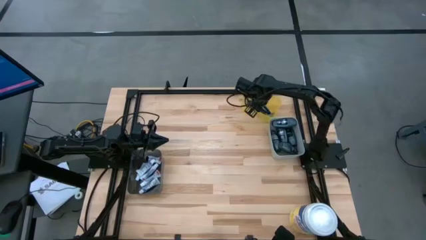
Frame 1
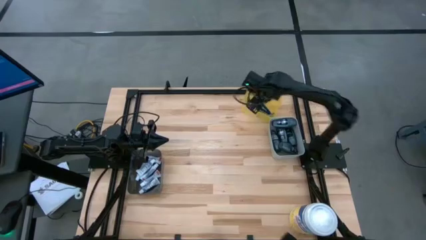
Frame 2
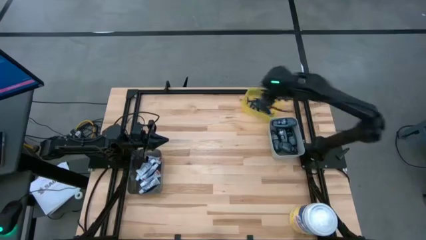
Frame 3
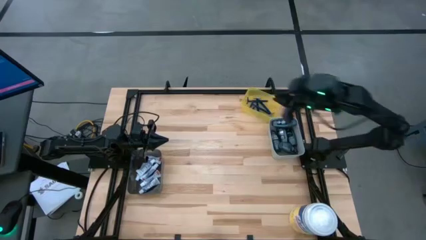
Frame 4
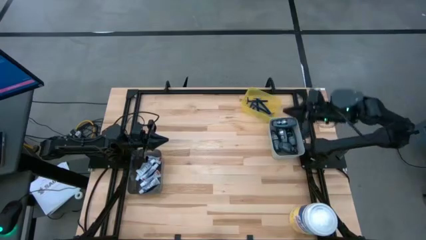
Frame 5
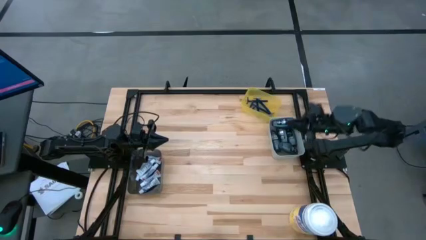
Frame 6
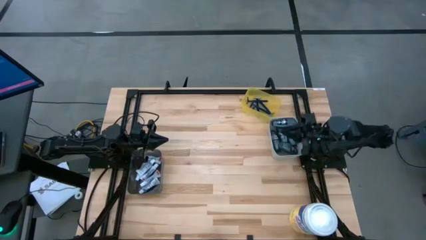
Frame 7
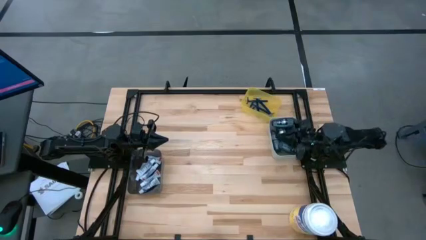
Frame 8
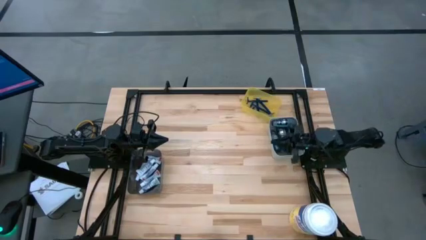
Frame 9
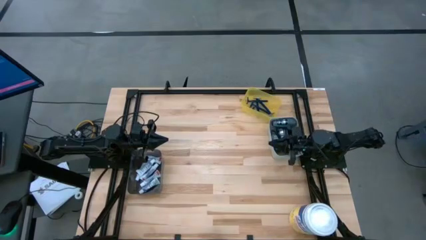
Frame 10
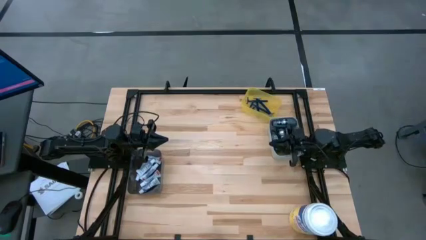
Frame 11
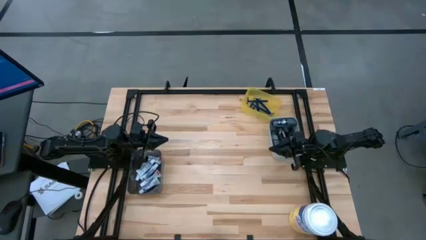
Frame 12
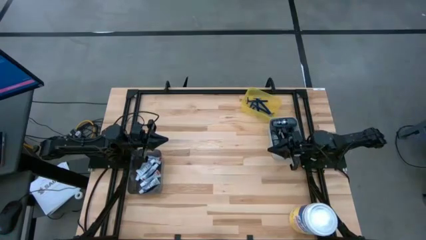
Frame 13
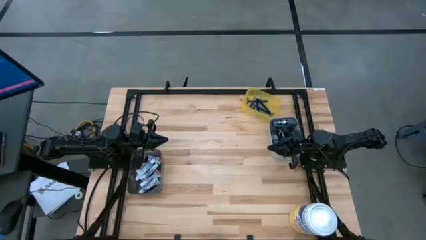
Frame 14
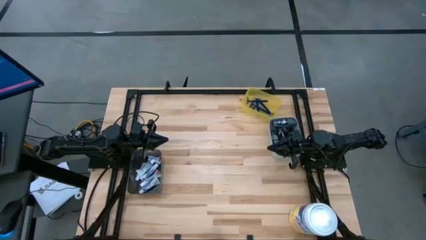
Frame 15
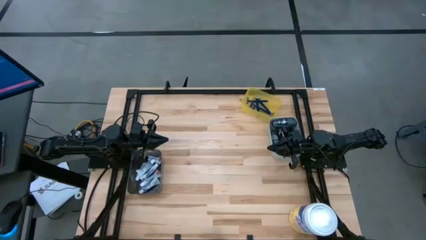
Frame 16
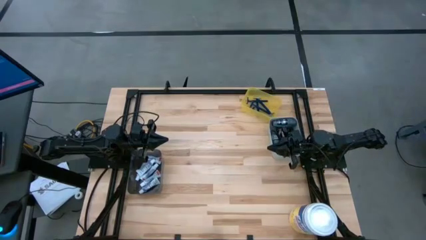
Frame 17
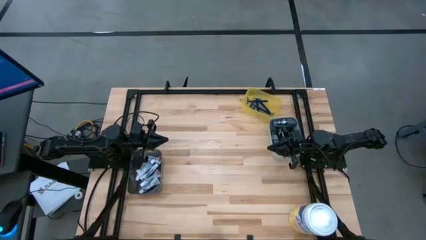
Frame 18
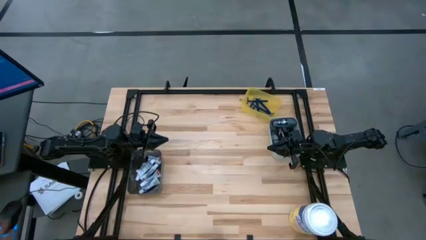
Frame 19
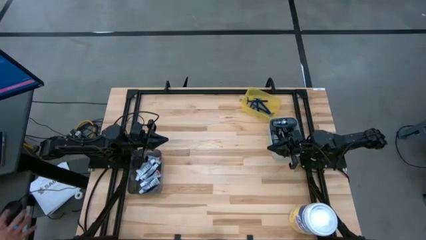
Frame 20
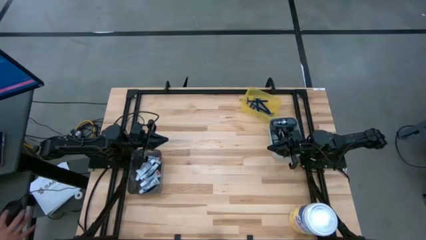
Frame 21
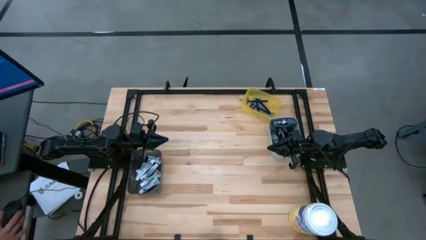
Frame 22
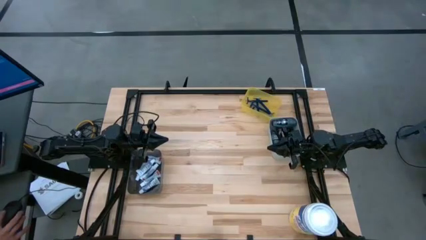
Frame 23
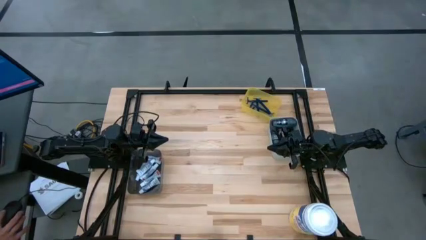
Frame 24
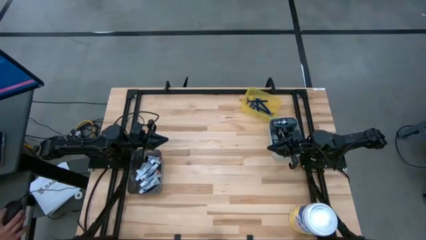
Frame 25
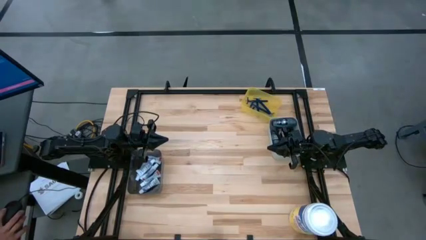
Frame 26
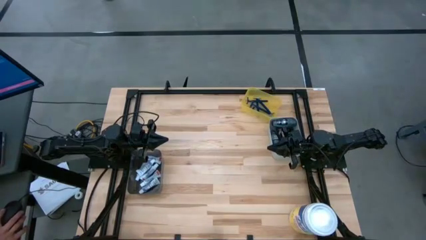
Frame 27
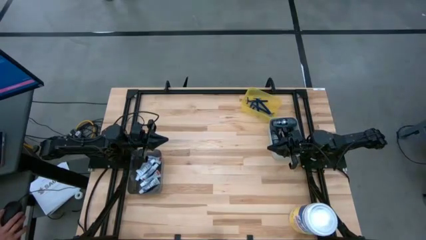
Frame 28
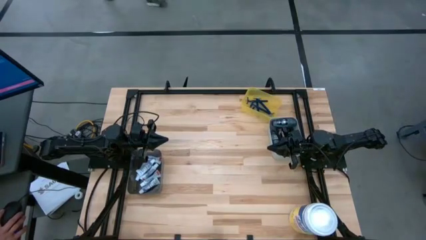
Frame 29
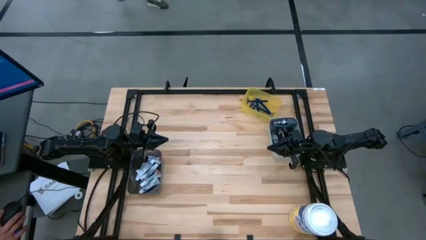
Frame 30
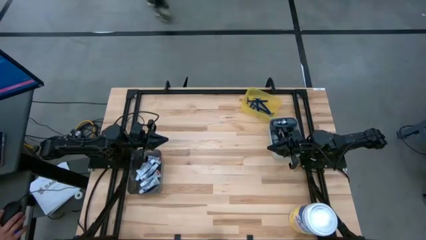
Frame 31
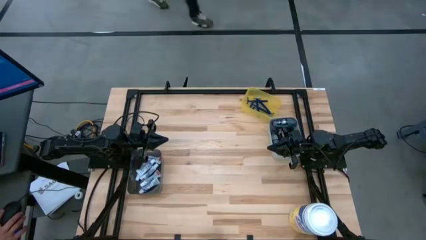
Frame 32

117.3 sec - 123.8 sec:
Task: Pick & Place Travel size toiletries
Return to Home Position

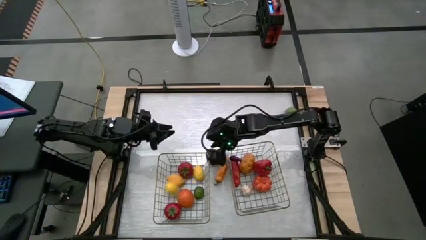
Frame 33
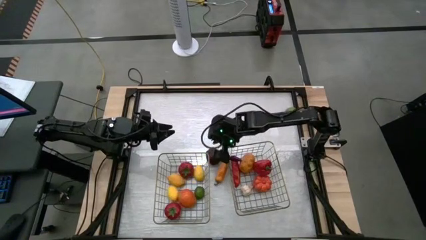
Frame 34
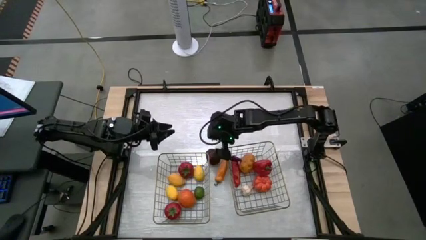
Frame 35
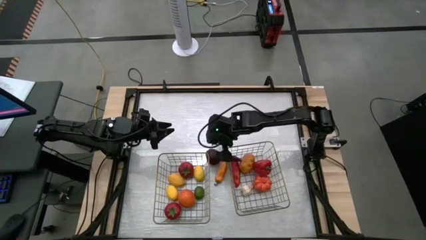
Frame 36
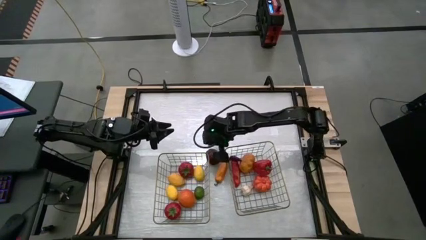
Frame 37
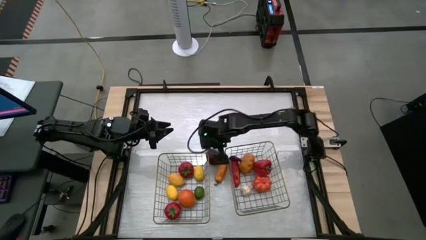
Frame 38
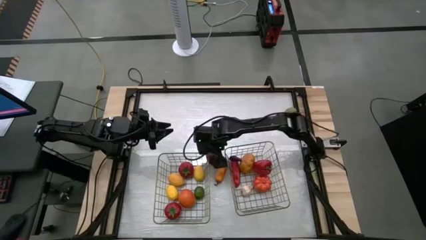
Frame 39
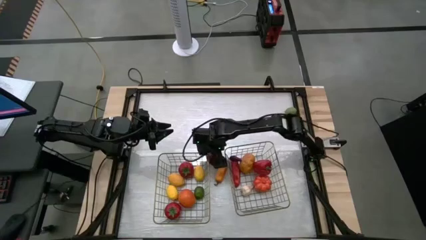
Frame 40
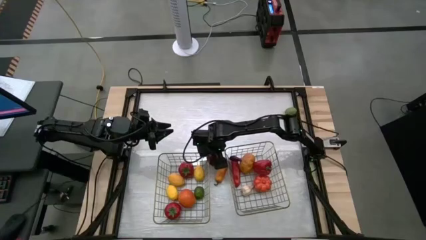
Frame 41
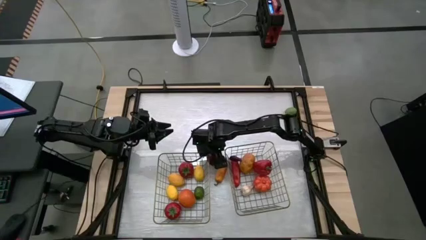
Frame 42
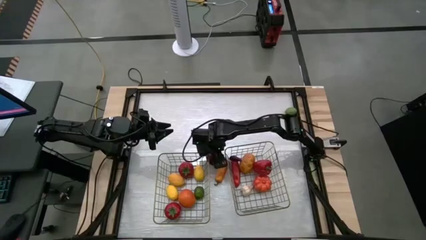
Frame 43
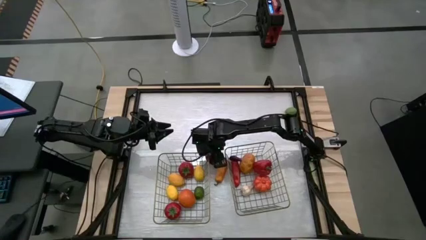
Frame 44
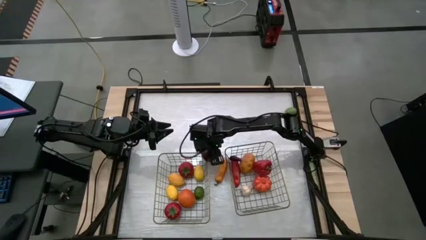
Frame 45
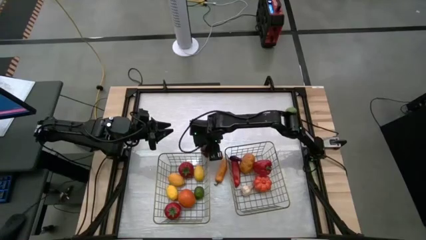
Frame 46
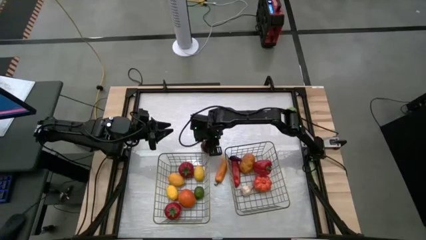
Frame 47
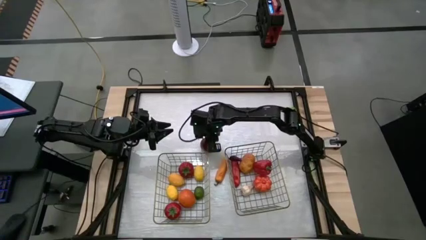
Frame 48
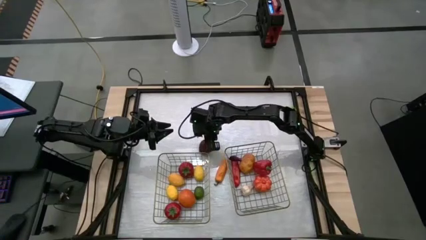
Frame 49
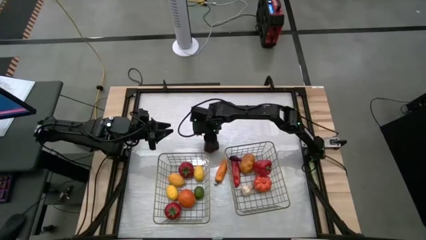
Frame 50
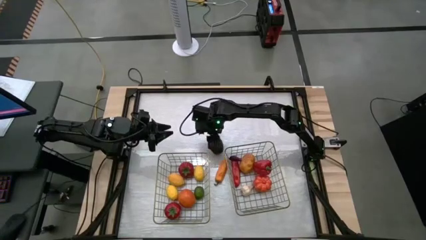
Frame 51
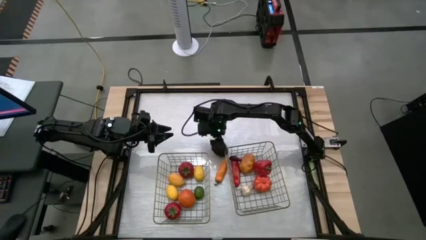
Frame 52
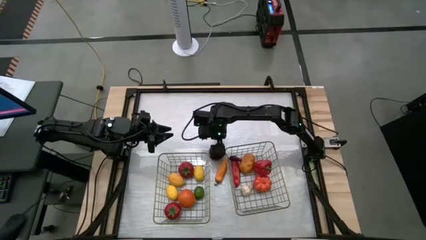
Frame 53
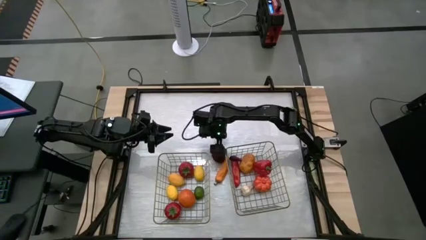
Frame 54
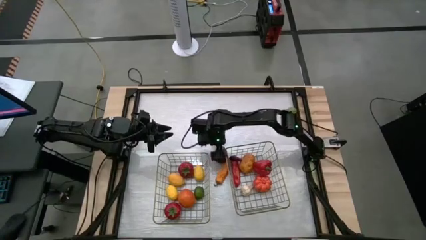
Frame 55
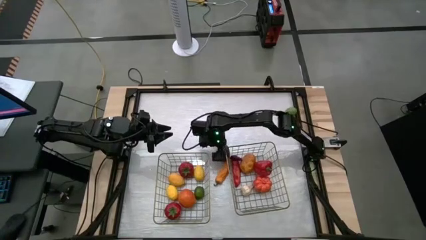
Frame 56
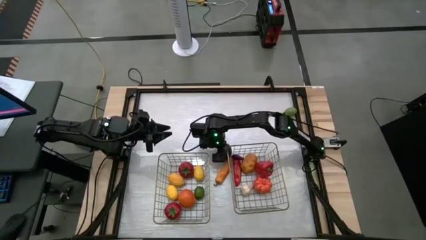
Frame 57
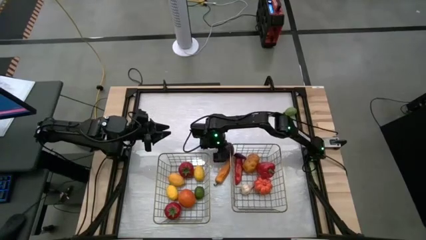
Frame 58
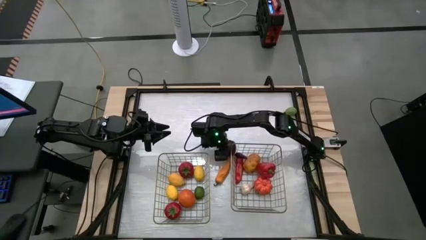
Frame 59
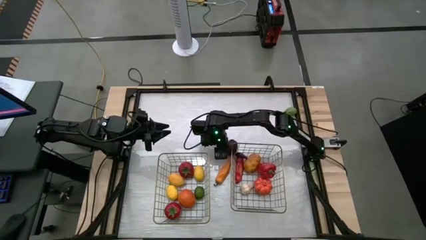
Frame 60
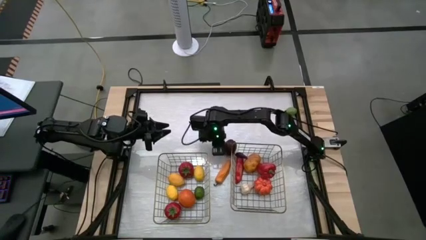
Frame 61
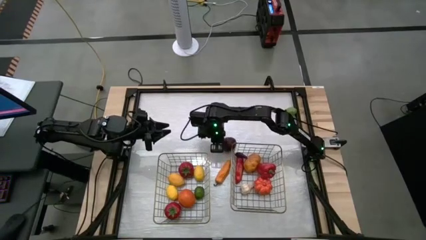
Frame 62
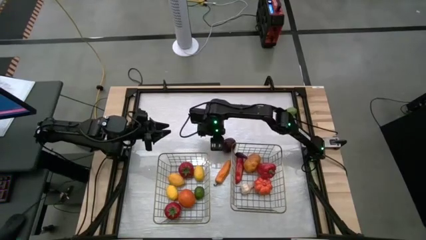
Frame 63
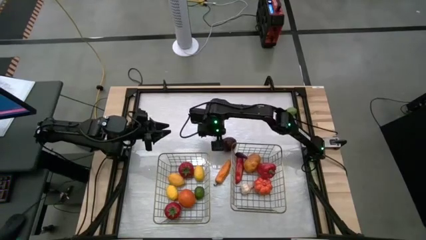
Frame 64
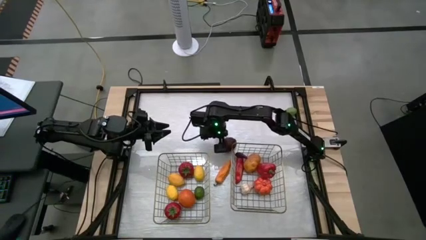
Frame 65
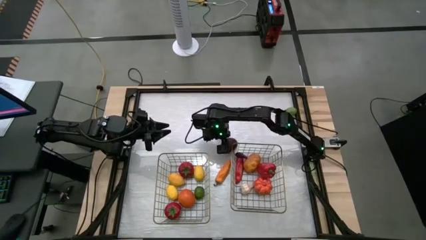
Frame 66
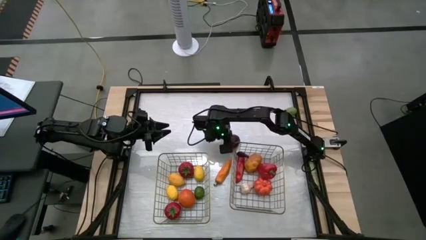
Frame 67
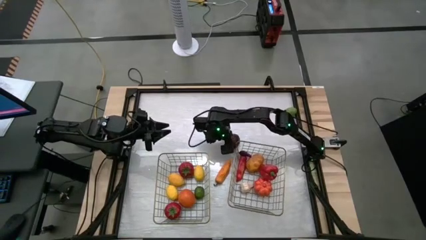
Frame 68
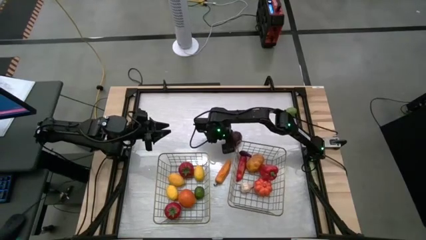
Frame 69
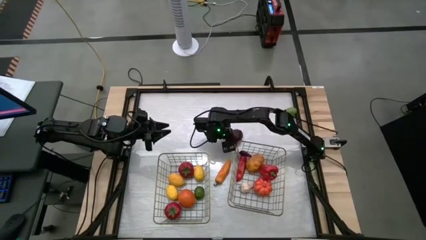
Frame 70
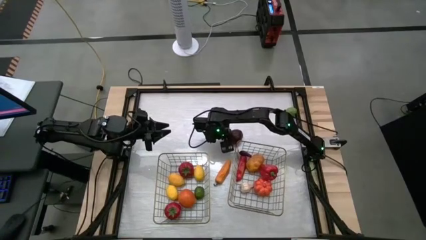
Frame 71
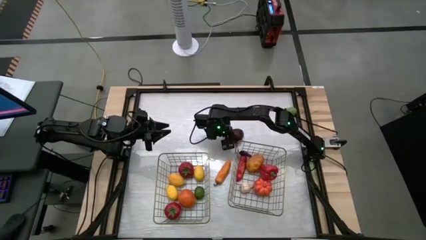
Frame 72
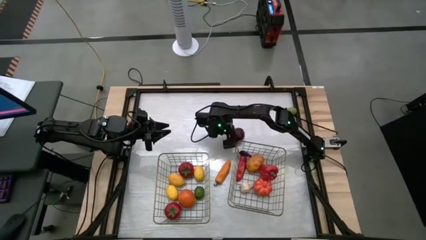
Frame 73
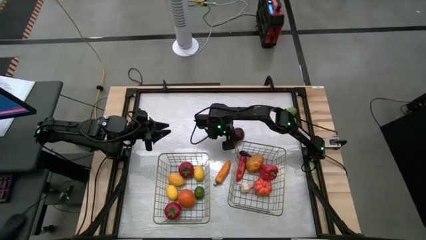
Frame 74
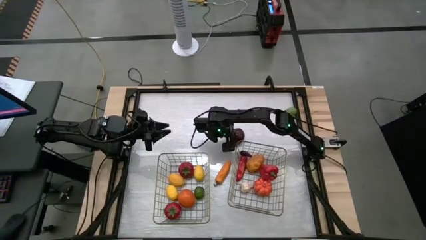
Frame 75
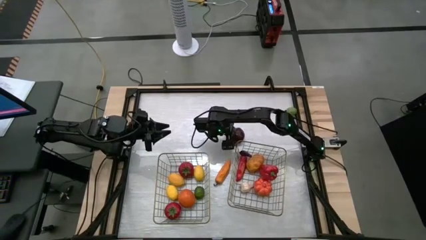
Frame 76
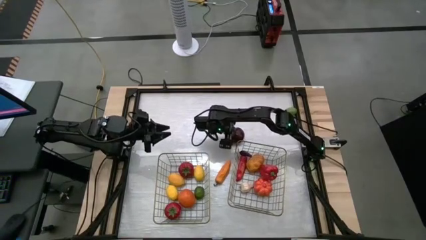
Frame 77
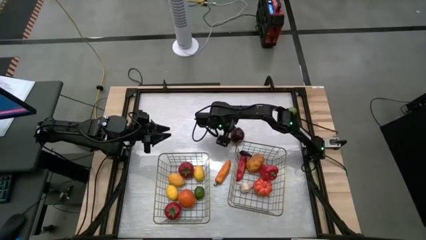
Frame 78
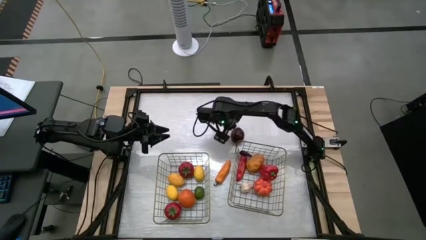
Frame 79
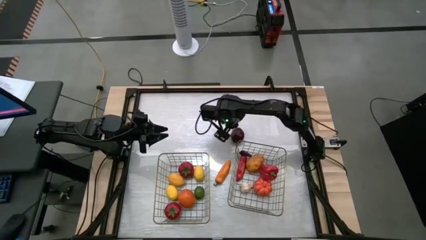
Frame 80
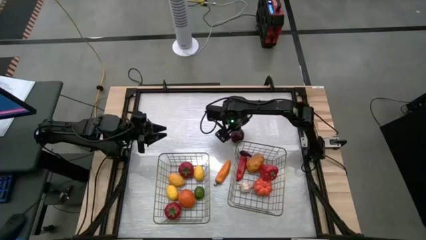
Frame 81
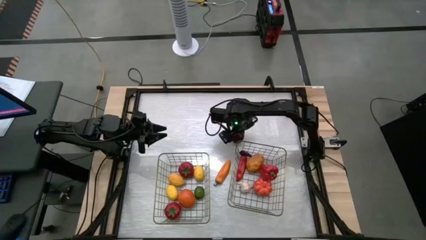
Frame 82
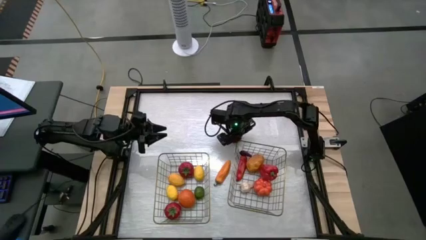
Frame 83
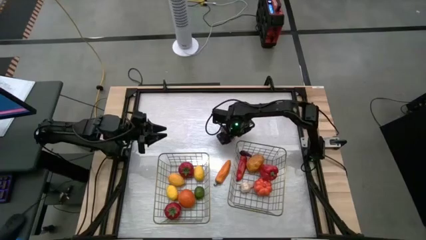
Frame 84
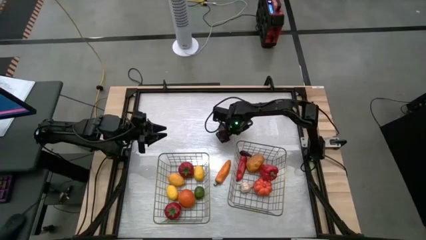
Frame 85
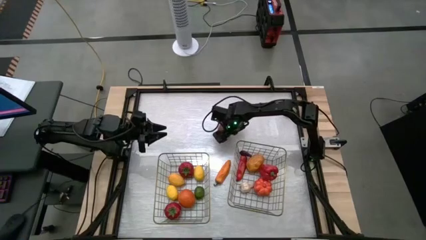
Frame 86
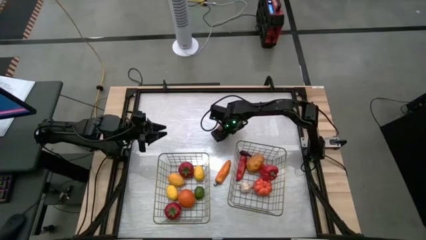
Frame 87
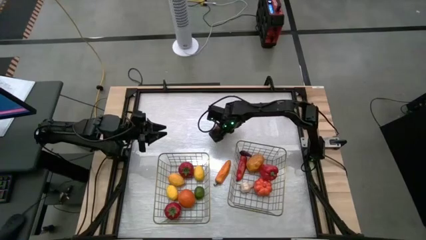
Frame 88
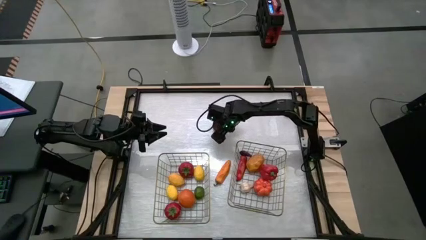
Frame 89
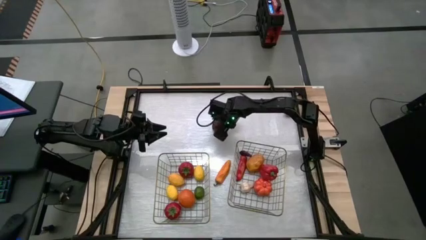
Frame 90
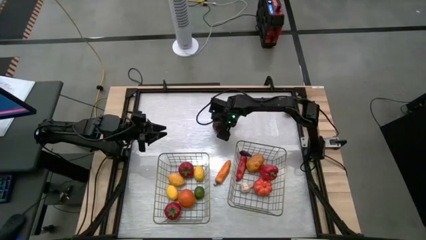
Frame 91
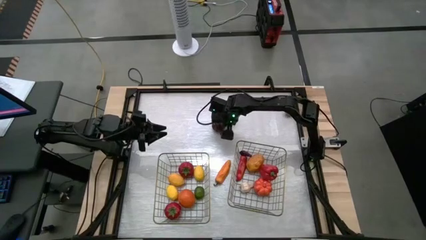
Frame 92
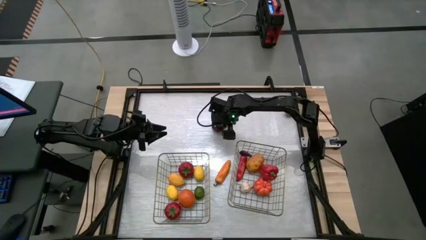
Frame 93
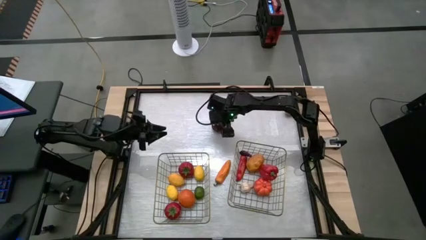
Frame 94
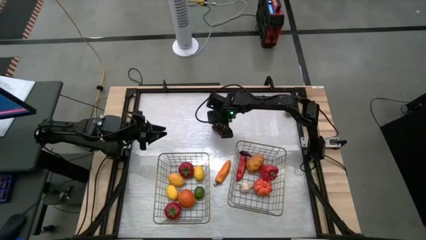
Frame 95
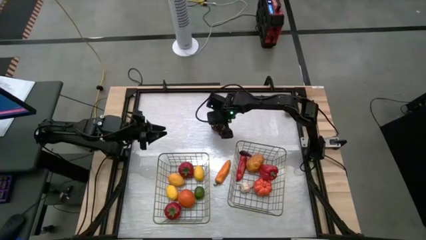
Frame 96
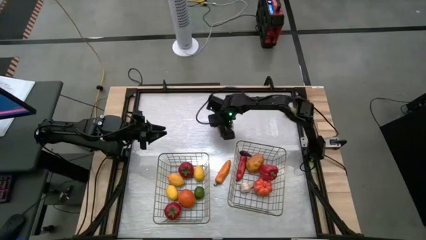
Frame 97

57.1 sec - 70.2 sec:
Task: Sort produce into baskets
Put the apple into the left brown wire basket
